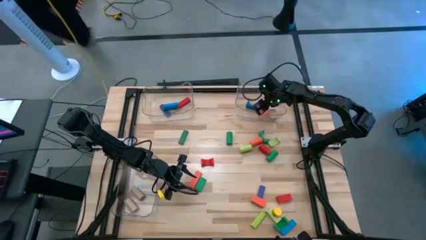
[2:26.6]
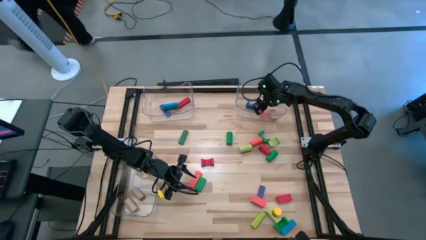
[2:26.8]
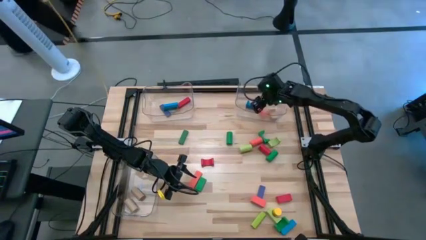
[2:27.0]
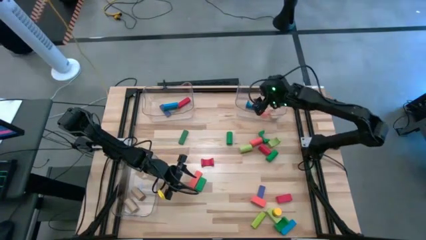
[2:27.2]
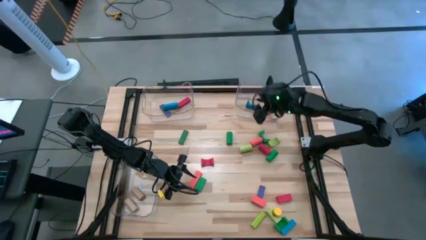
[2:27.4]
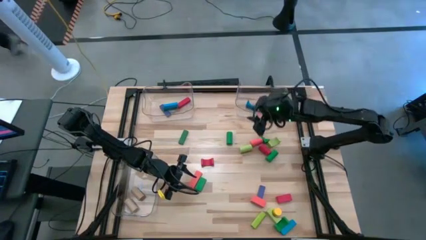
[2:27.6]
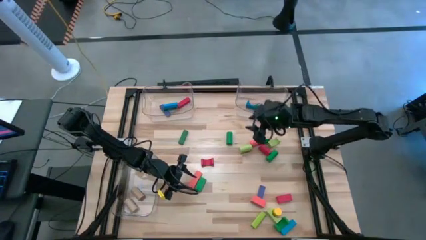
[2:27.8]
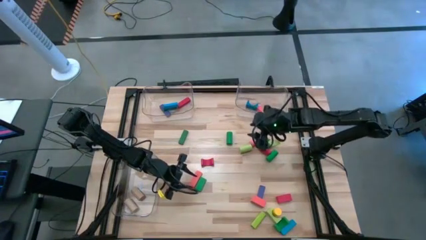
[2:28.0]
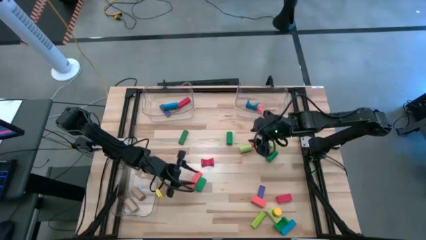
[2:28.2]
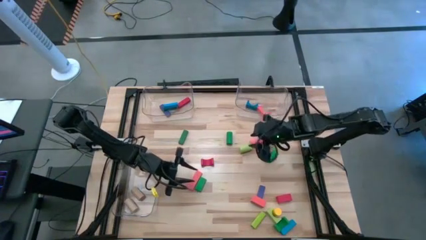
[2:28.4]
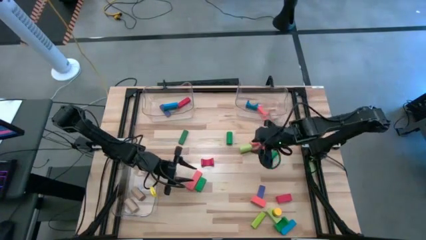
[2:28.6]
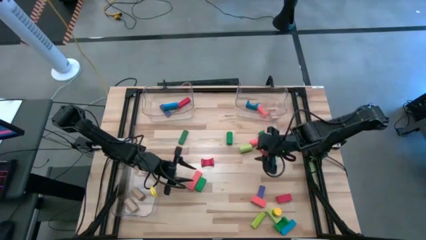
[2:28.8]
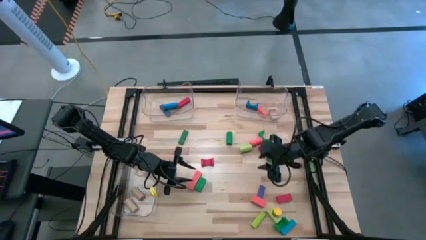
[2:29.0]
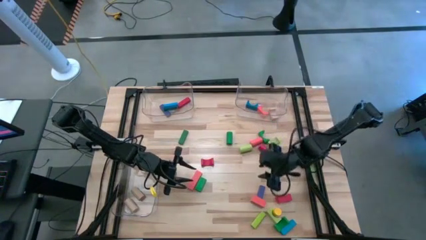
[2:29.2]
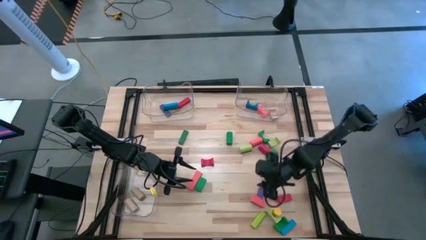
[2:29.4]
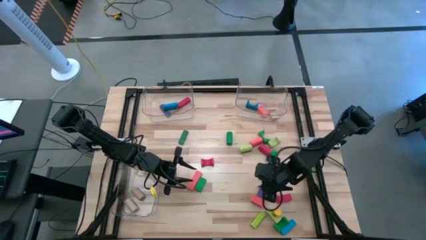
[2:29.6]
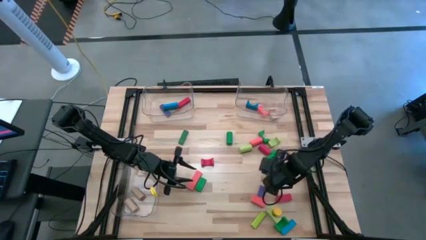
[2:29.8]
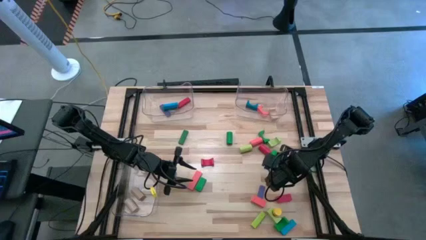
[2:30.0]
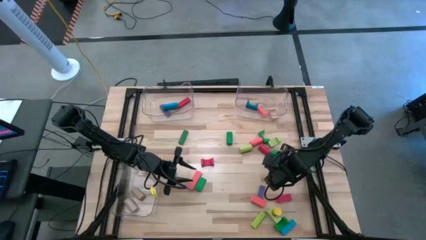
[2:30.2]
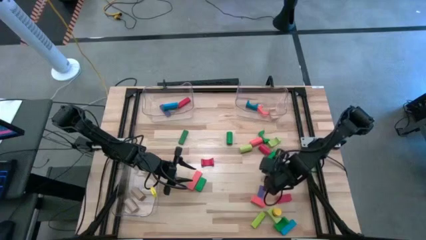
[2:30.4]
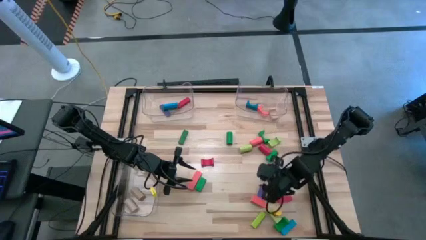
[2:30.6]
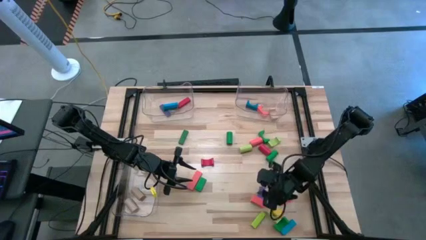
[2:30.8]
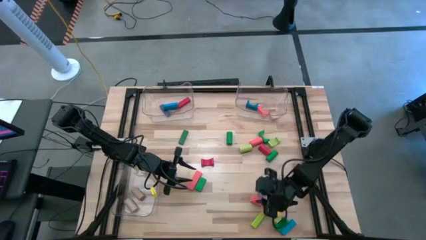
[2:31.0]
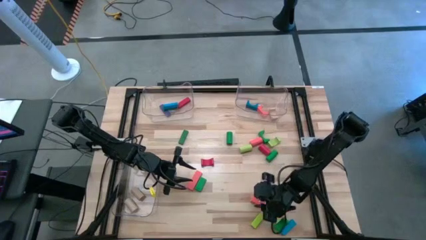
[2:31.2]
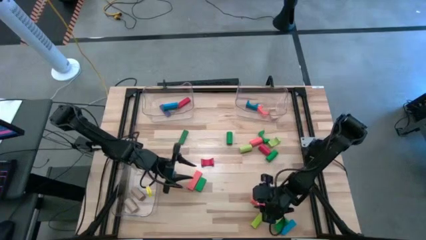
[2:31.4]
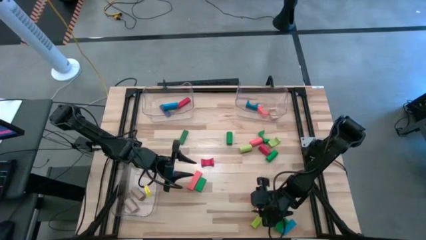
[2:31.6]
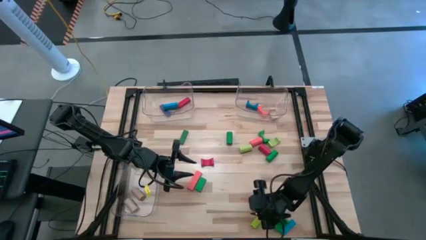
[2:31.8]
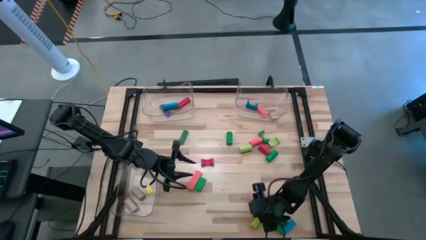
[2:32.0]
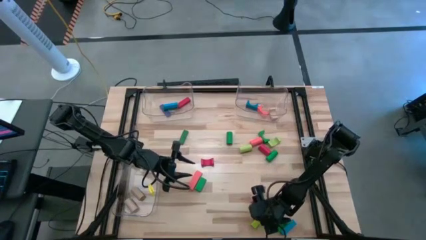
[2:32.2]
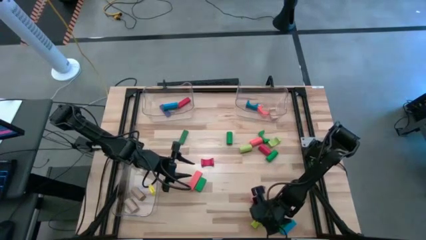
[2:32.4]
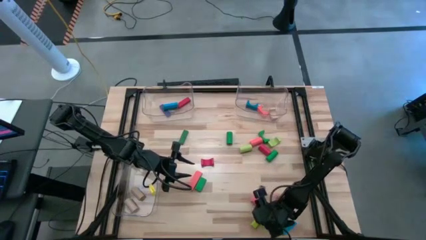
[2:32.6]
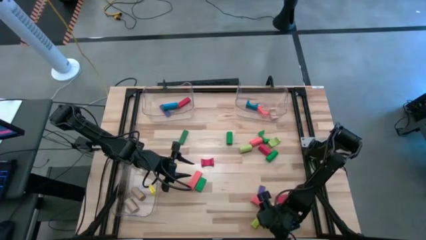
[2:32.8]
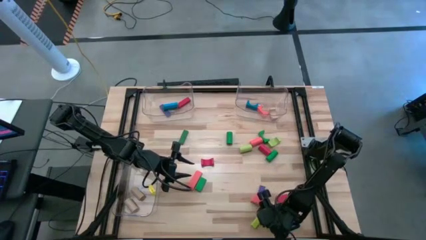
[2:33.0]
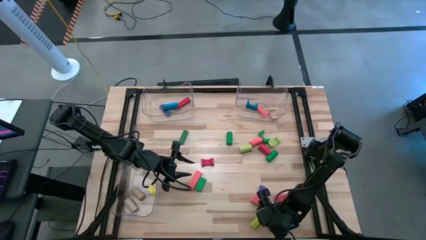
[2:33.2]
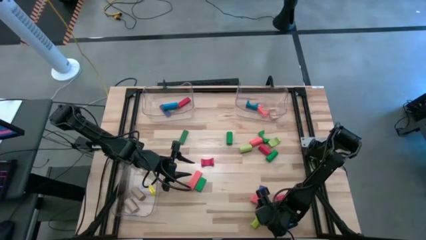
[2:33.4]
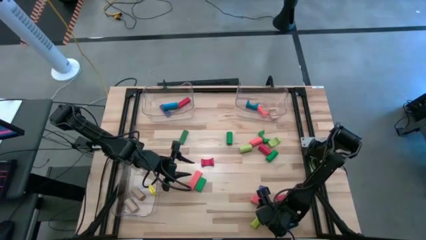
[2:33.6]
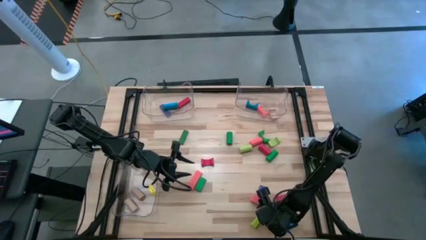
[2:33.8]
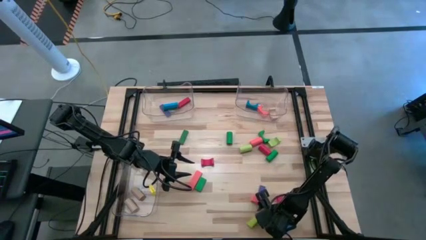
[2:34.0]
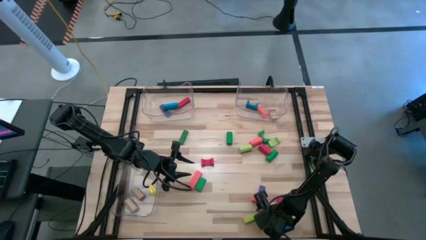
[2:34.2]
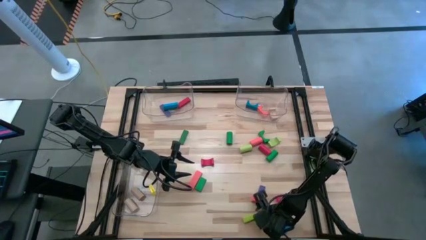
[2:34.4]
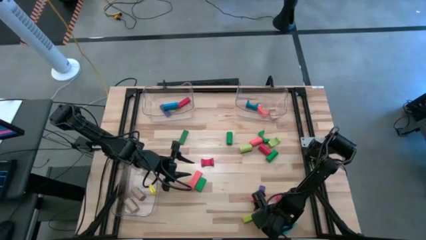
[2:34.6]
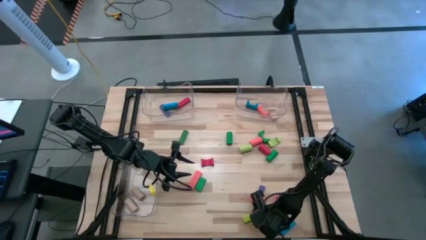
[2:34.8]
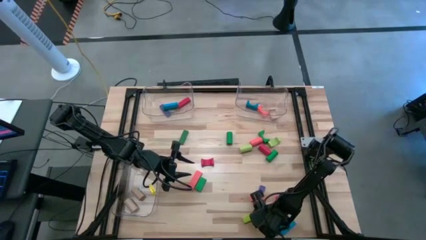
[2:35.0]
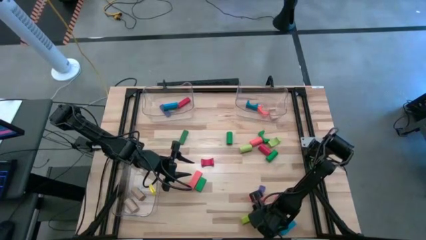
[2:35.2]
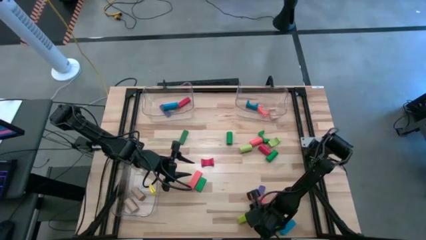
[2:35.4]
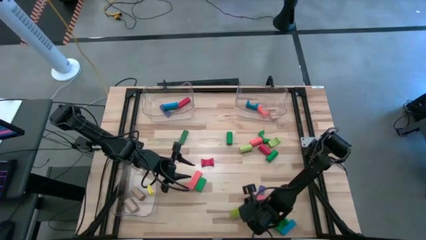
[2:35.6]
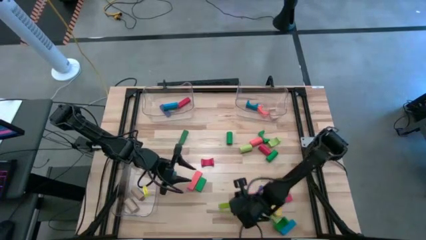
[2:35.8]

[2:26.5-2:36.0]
Task: Sort blocks by size
Put the light green rectangular block into the top left transparent bin

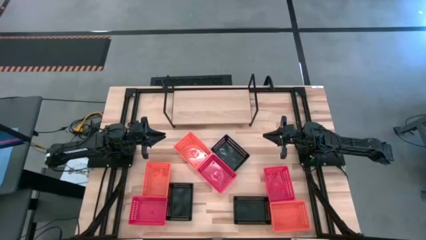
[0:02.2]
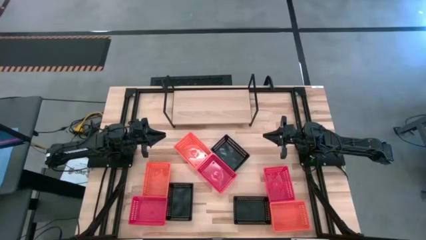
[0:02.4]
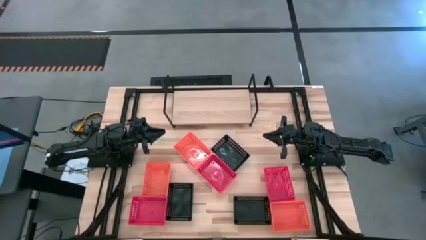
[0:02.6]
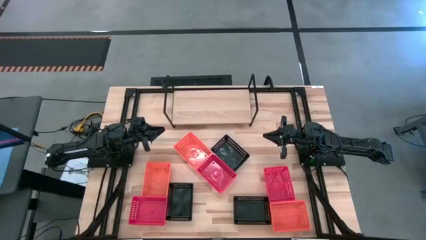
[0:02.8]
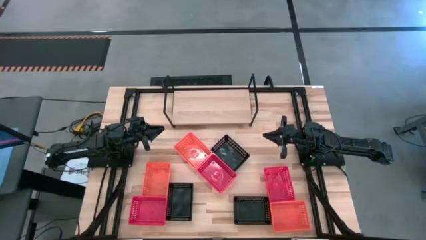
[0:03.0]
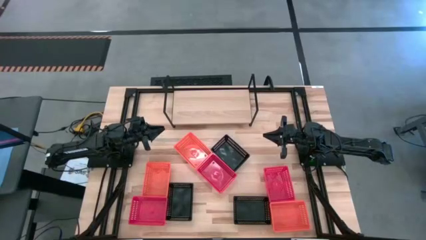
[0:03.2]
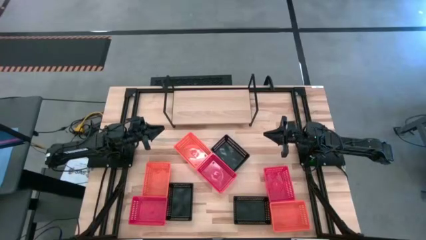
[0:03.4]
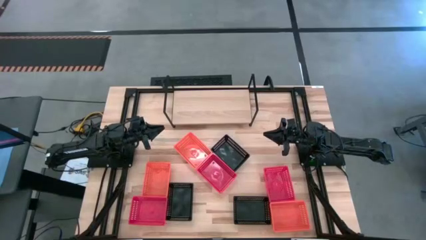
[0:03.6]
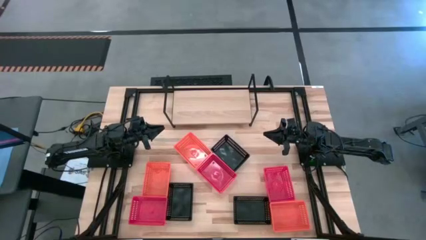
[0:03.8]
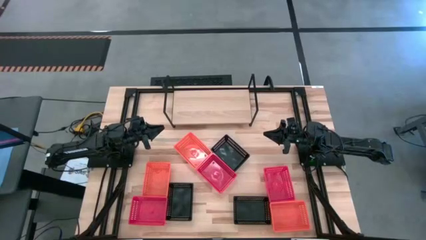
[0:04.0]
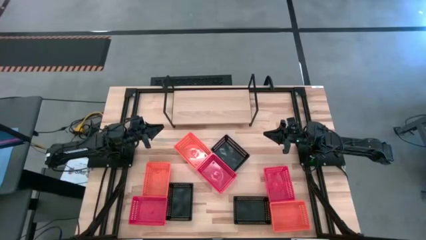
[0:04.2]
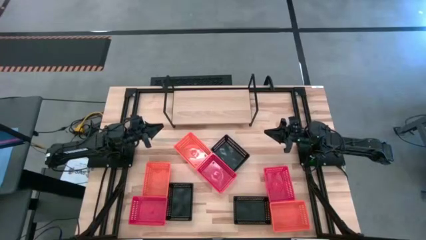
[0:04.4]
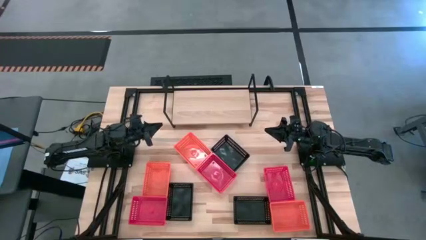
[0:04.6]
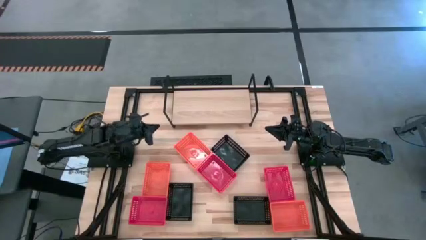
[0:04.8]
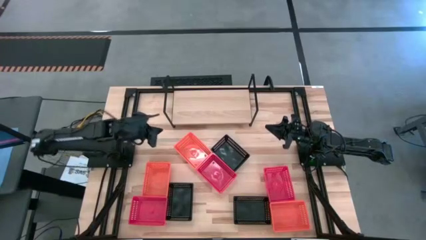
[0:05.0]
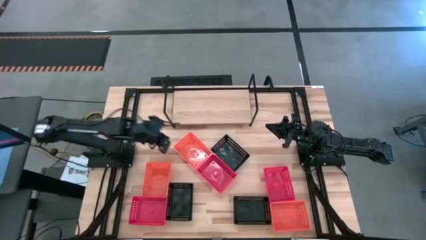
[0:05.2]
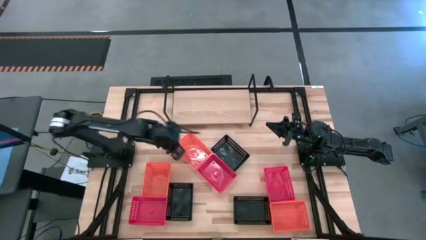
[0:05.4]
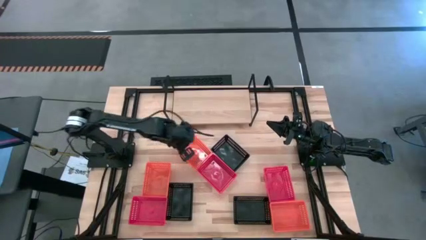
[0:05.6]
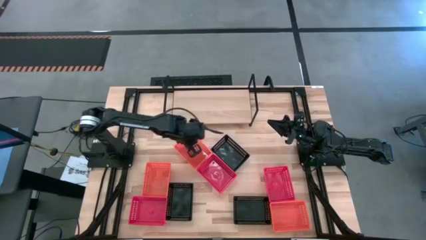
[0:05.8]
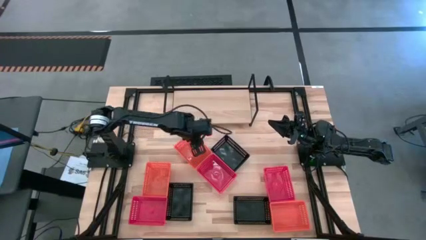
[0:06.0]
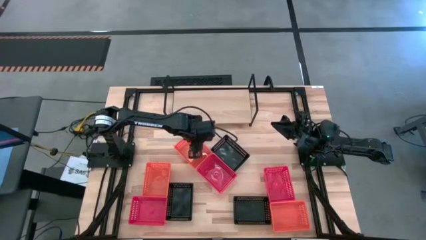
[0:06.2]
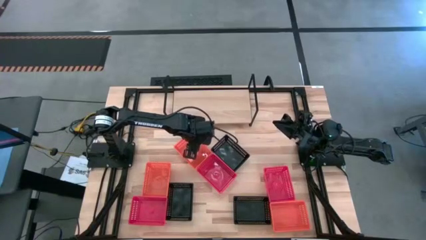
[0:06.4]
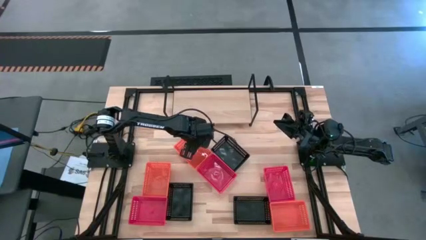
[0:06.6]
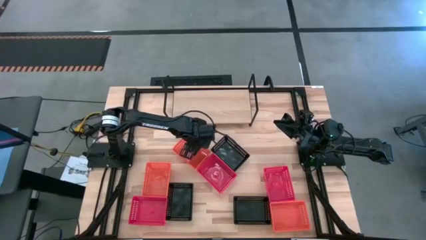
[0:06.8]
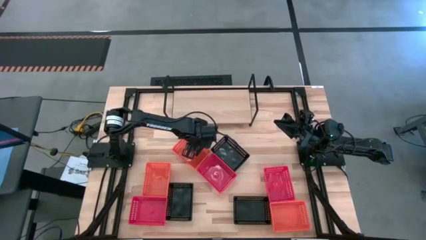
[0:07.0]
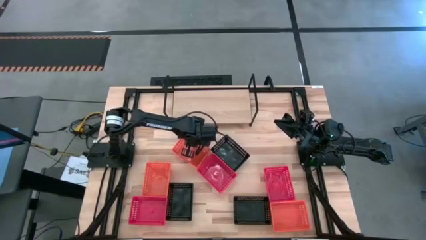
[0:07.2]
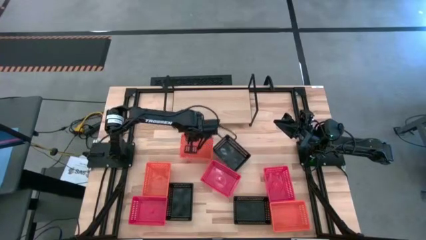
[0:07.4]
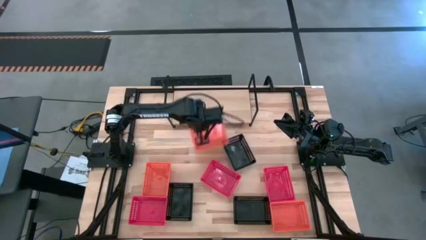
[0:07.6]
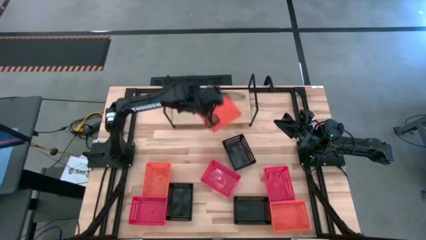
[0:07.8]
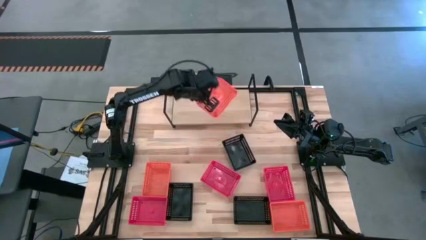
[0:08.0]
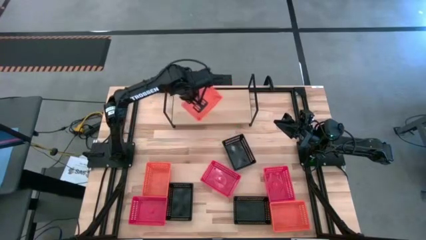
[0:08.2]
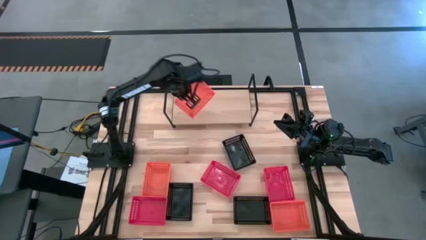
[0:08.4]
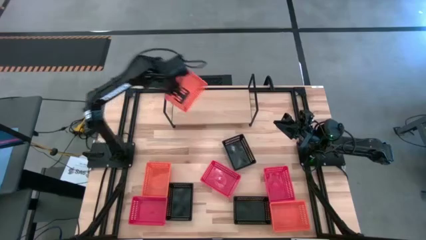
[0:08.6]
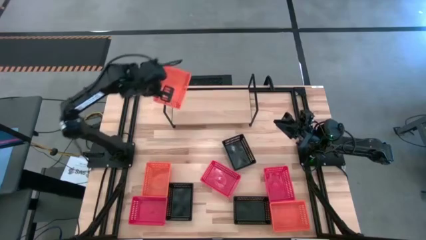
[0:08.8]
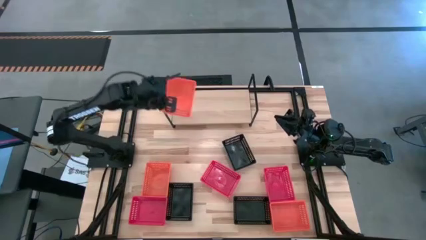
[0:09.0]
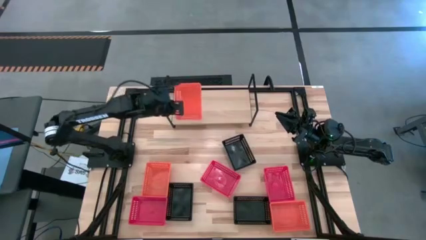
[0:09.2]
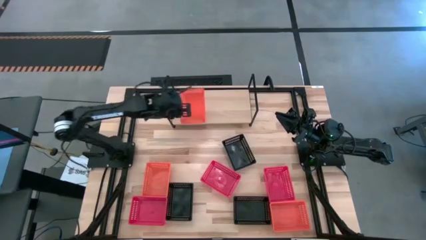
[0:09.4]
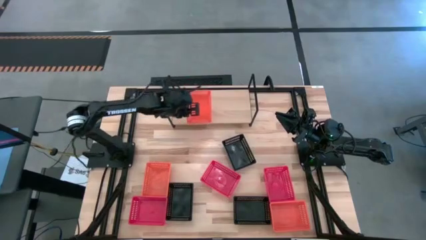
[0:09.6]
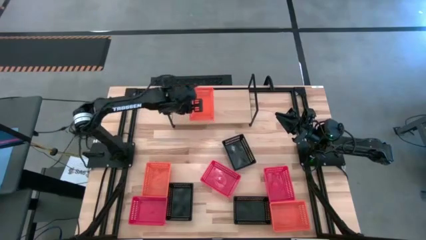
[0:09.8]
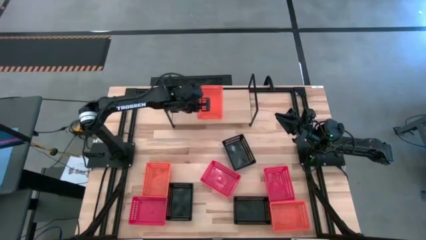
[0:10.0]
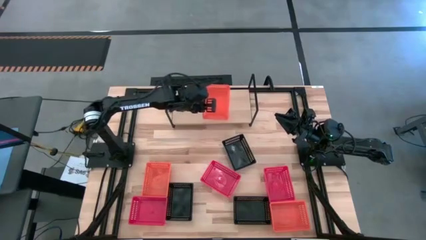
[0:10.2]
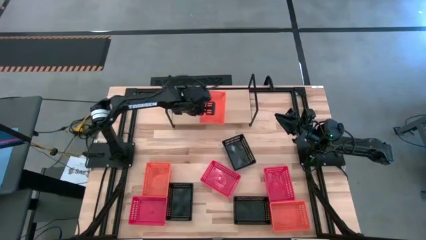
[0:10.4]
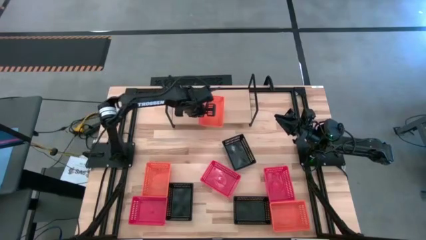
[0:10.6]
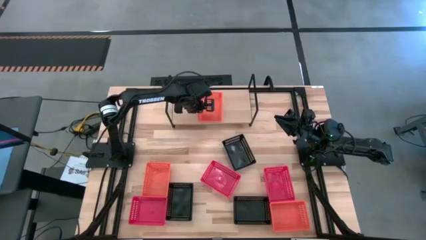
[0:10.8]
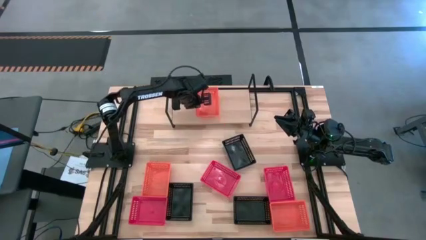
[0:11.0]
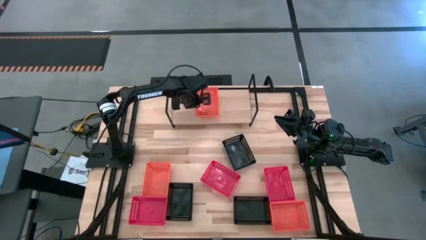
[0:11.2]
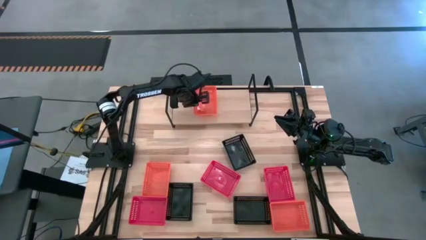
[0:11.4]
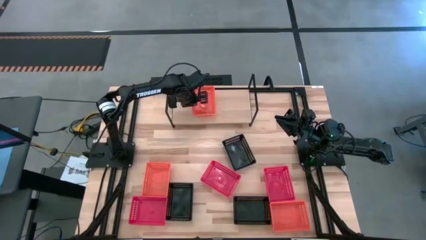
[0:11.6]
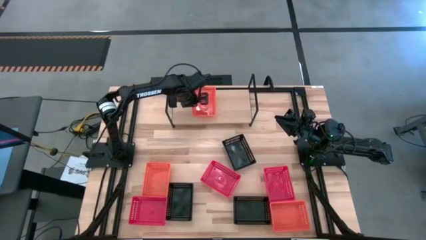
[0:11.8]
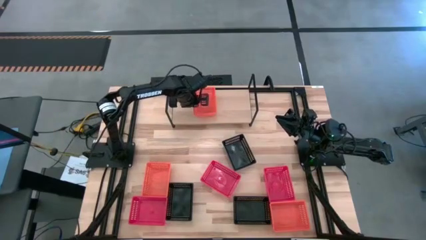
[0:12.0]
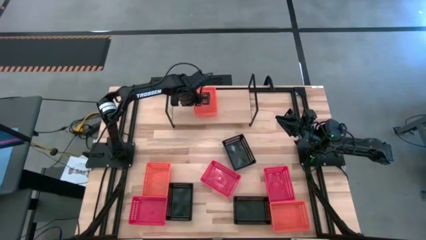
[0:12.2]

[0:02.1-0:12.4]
Task: Stack baskets on shelf by color
Put the top center orange bin on the shelf
